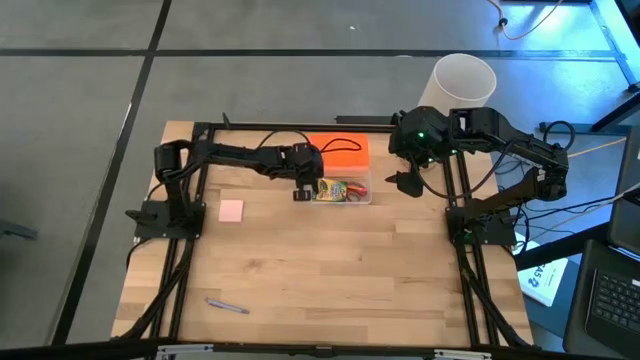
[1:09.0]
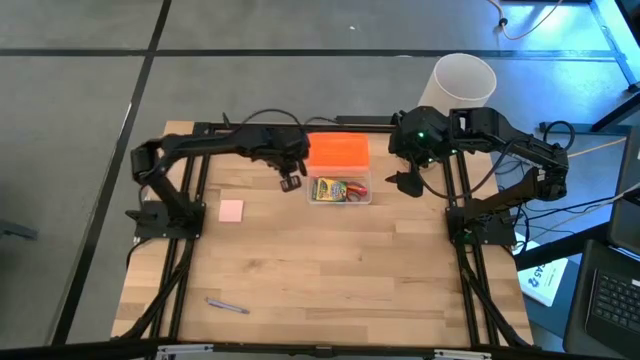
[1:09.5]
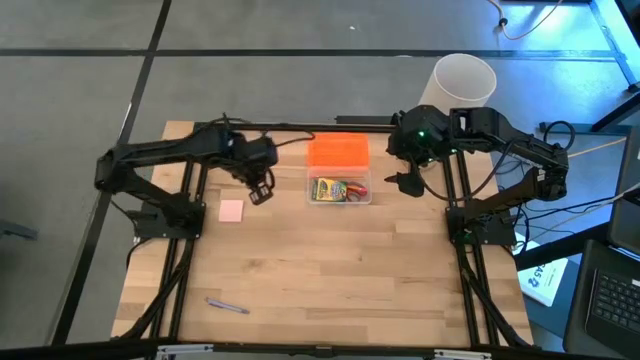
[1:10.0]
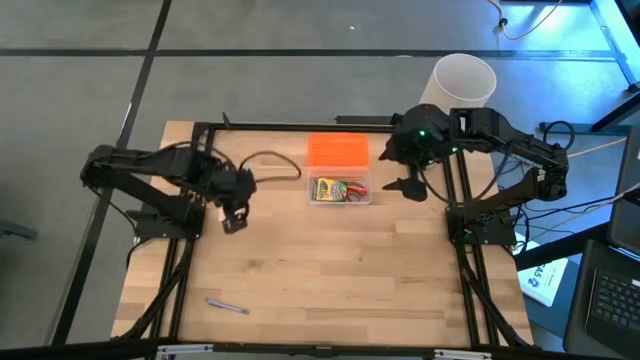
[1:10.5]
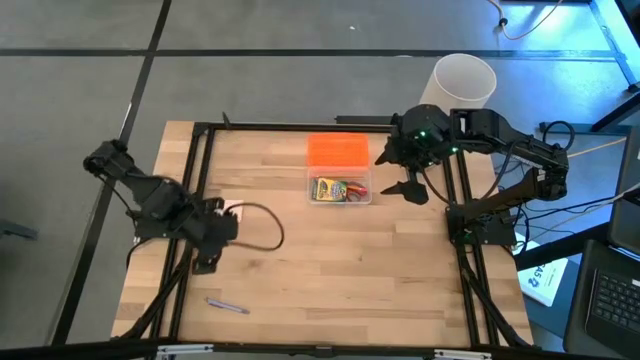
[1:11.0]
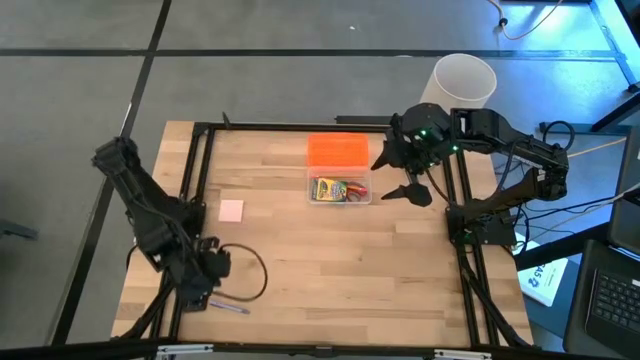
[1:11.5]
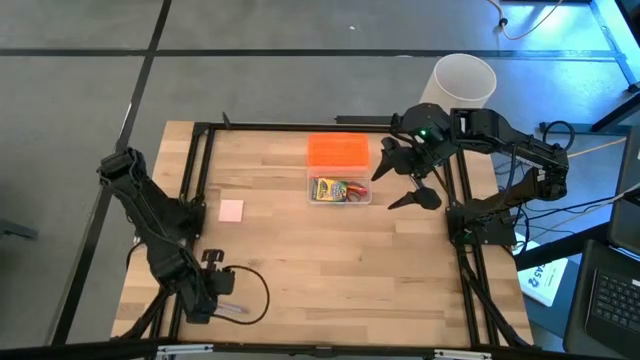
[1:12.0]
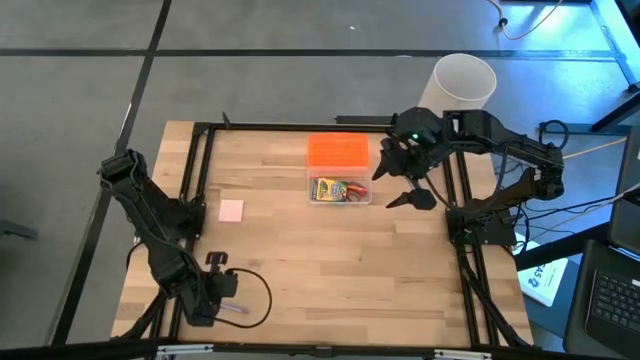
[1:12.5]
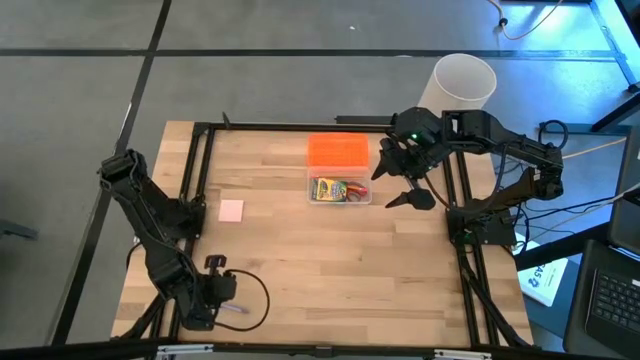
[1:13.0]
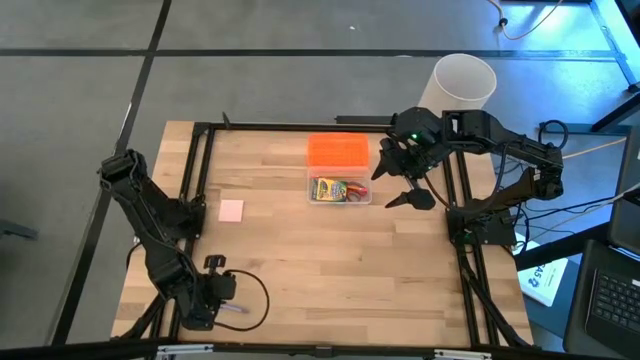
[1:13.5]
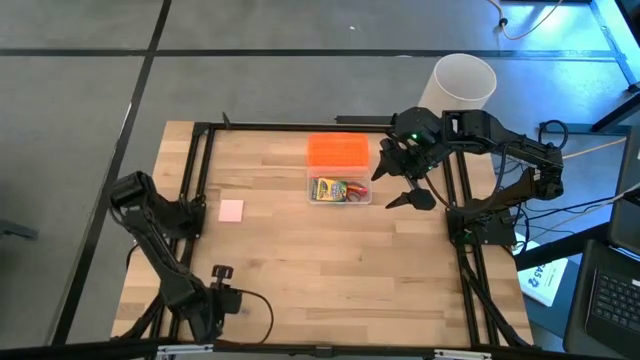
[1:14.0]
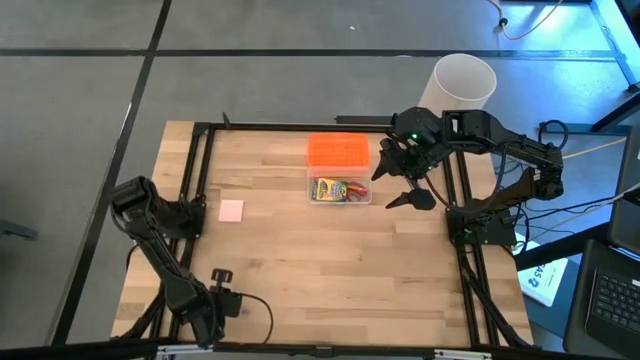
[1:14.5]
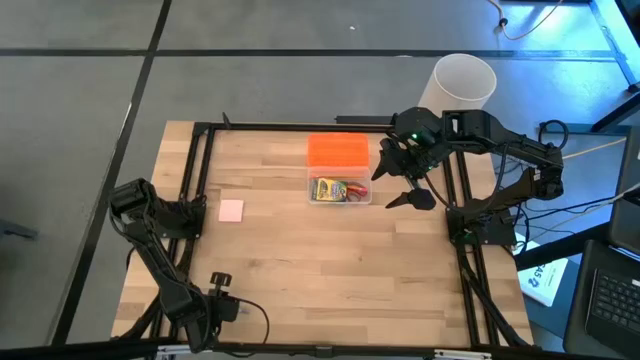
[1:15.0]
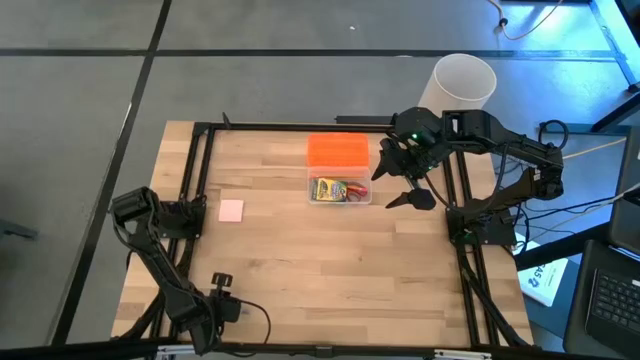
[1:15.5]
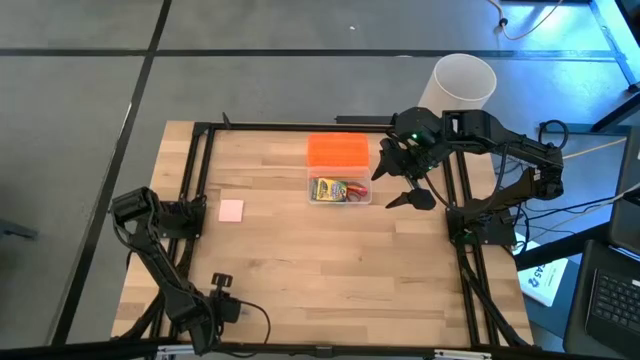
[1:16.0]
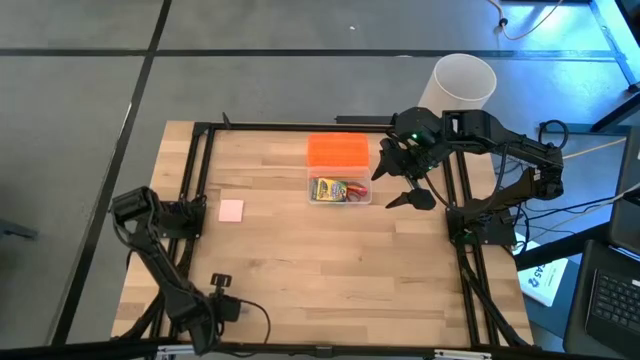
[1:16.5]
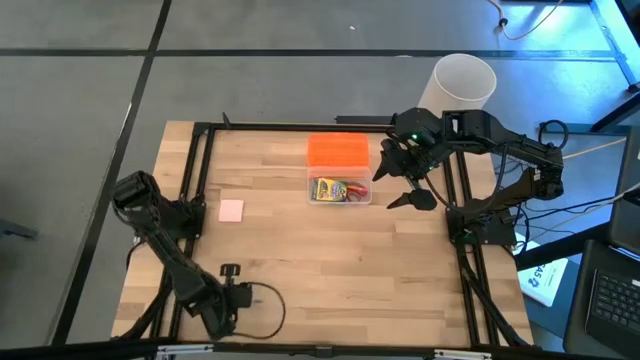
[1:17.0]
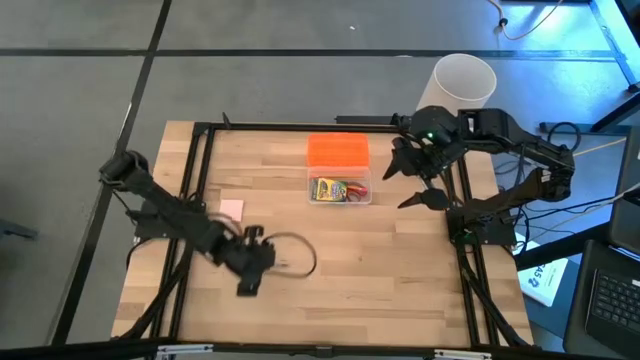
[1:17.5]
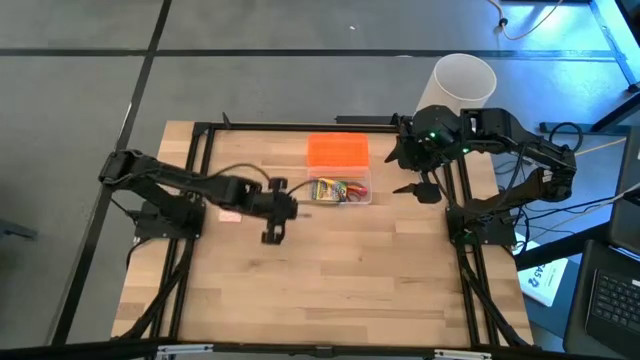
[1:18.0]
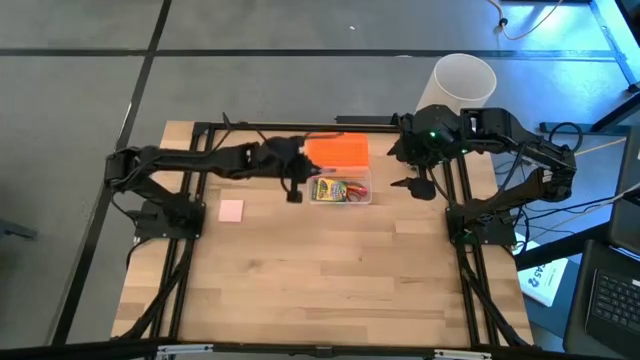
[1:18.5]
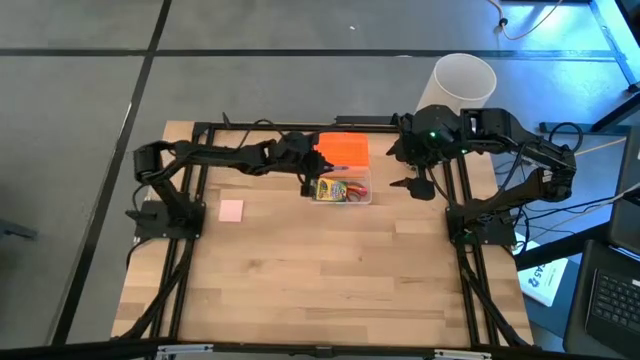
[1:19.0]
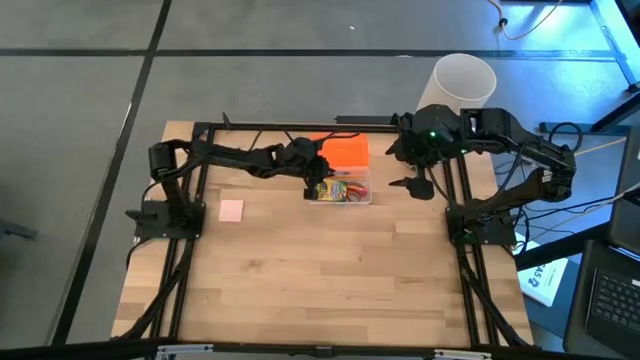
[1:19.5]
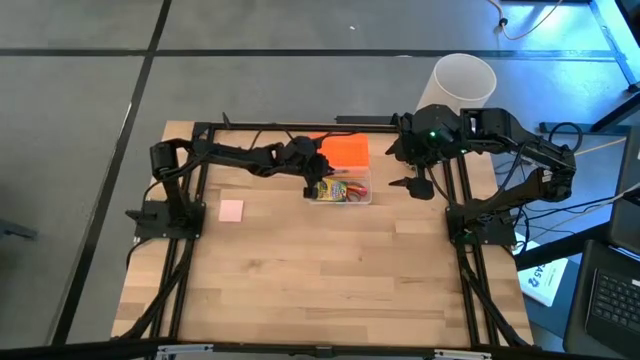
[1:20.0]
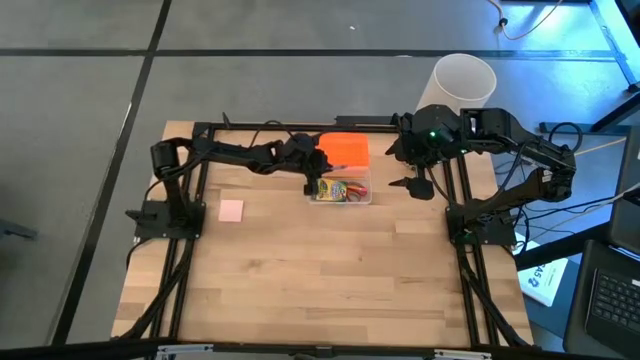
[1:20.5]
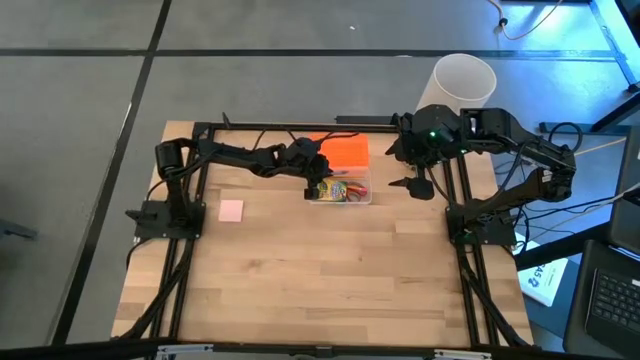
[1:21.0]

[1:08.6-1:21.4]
Task: Pack school essentials
Put the purple pen into the orange supply box

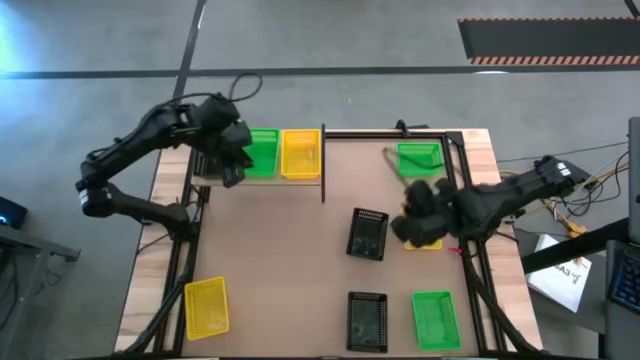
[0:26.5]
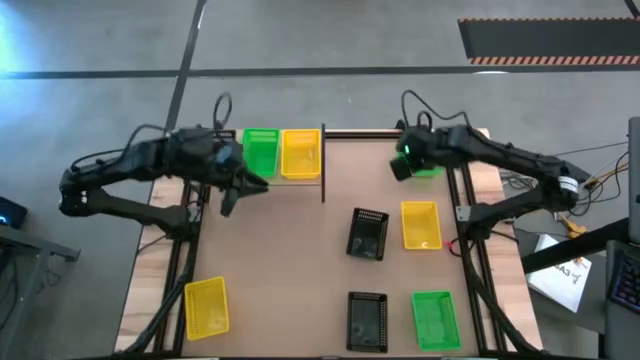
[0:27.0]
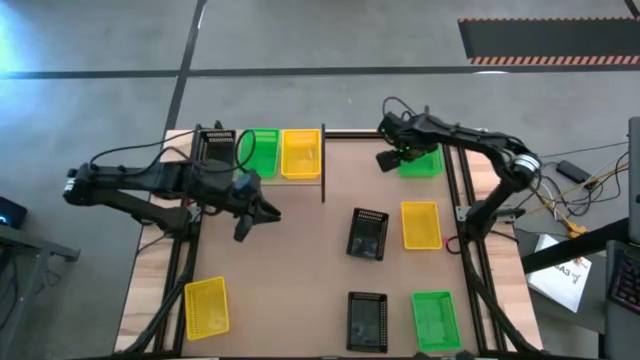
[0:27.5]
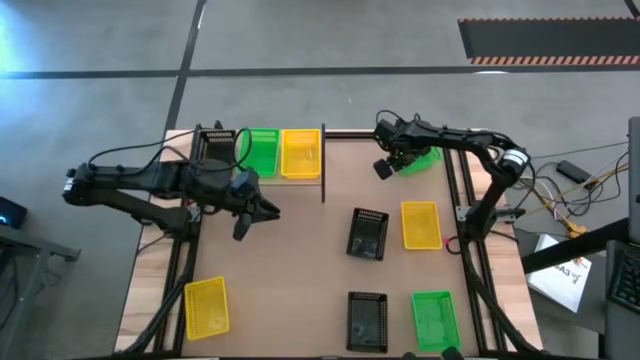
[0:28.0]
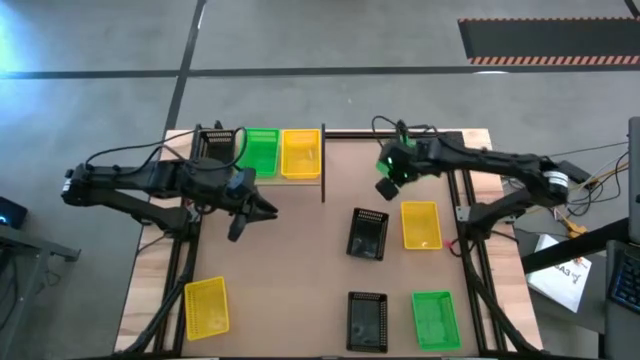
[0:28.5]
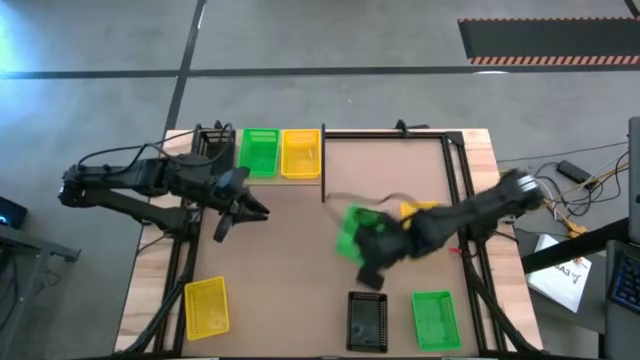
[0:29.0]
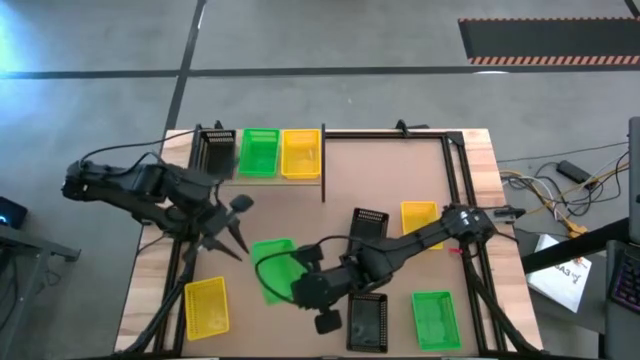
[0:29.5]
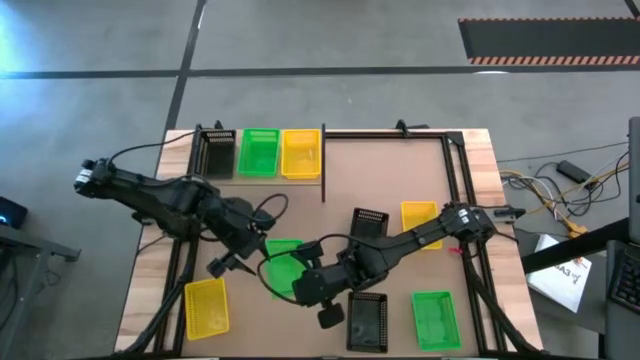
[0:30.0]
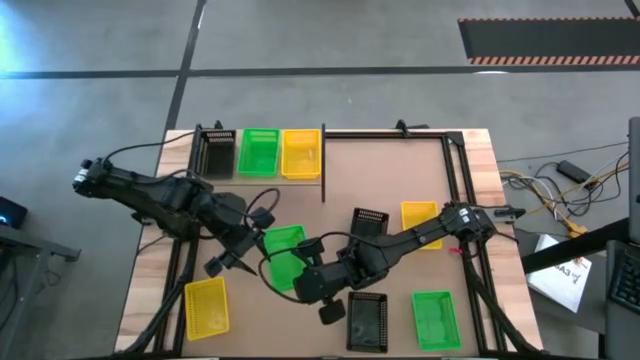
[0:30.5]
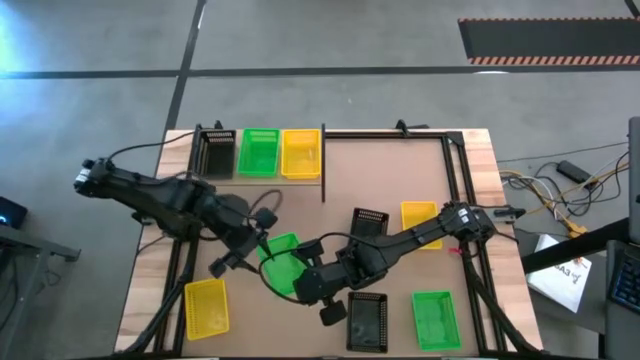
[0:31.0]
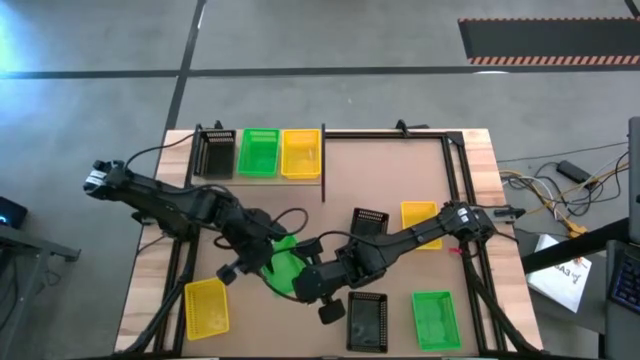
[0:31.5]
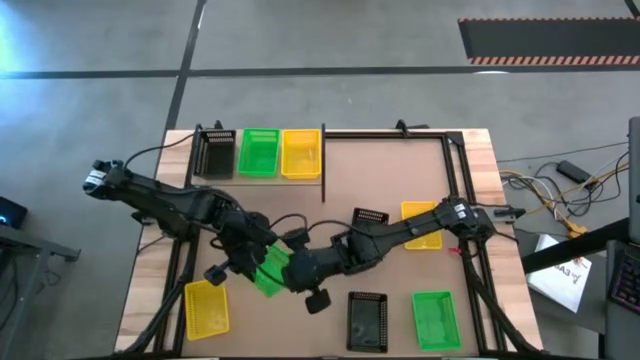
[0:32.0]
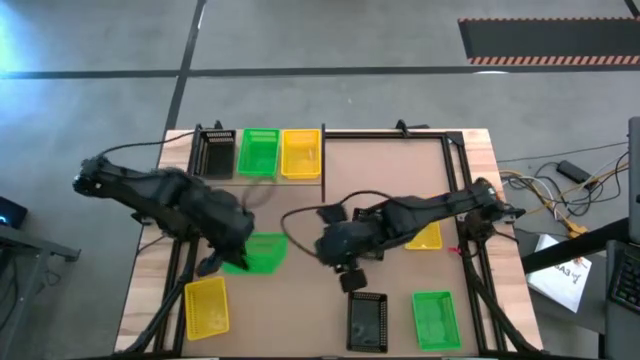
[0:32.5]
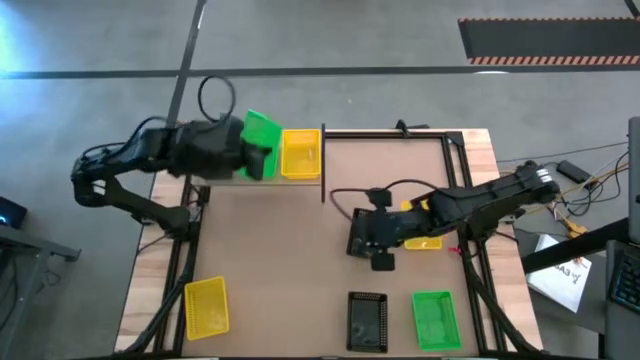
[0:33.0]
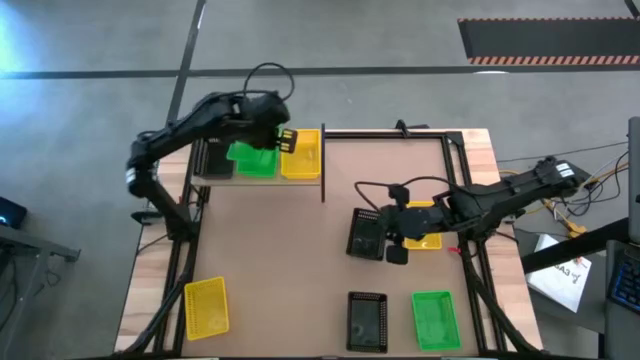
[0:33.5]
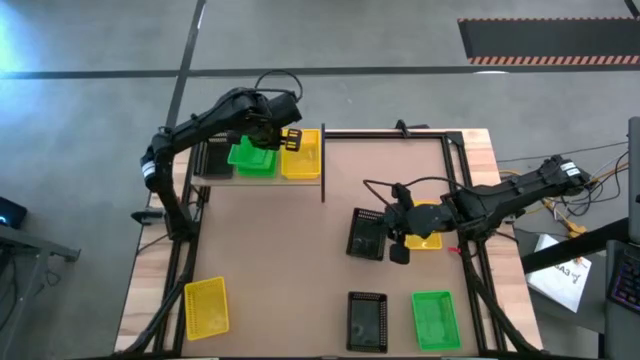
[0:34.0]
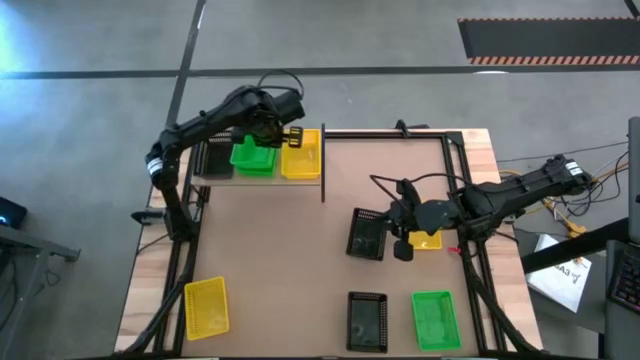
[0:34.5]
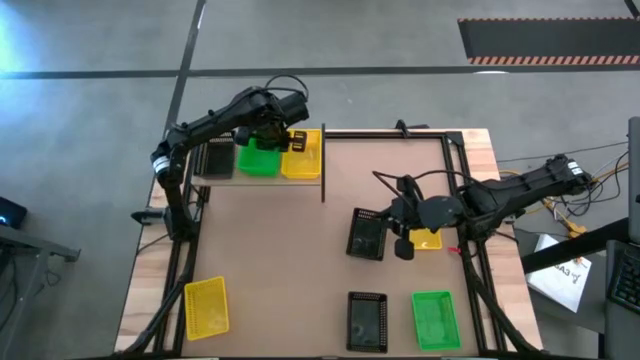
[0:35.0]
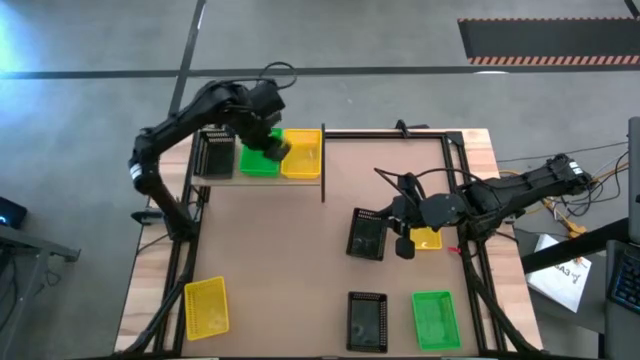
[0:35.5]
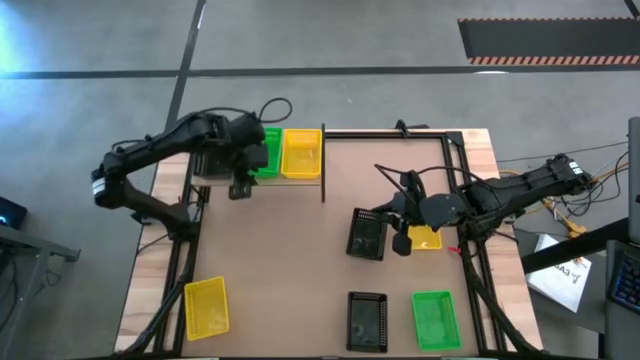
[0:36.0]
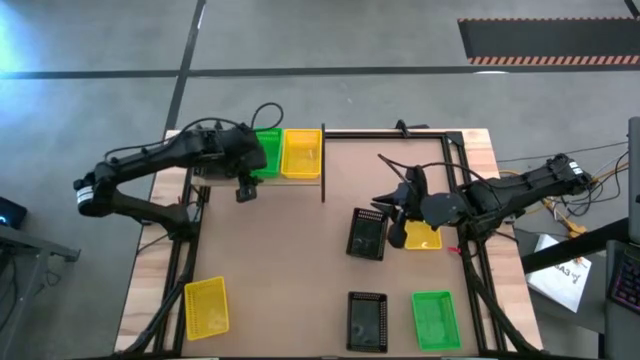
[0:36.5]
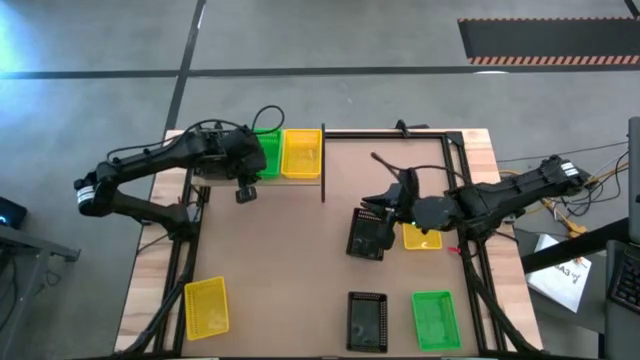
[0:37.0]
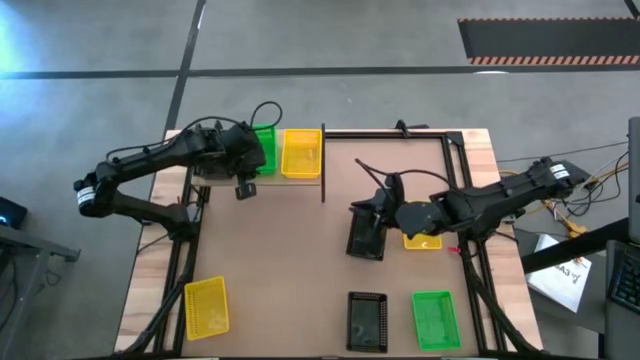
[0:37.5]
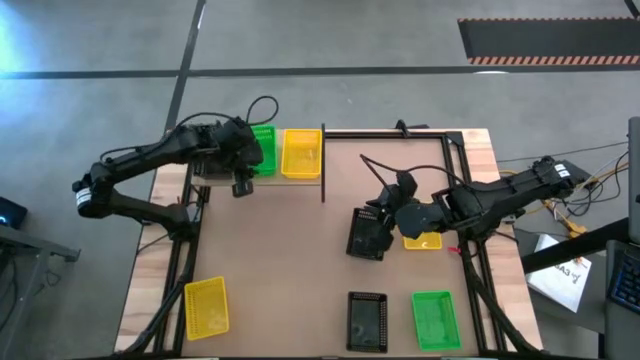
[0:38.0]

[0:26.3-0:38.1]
Task: Stack baskets on shelf by color
Stack the top green bin on top of the other green bin on the shelf
